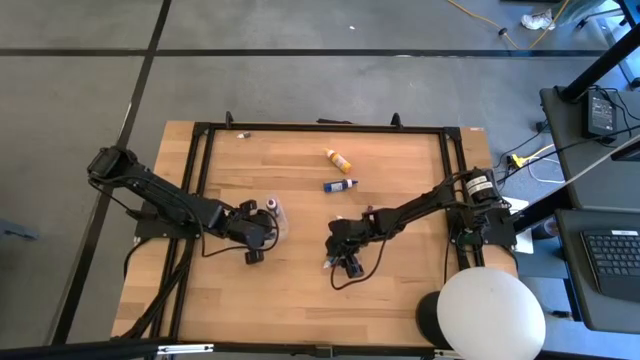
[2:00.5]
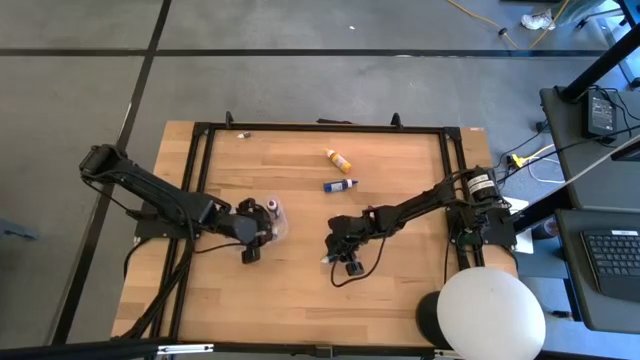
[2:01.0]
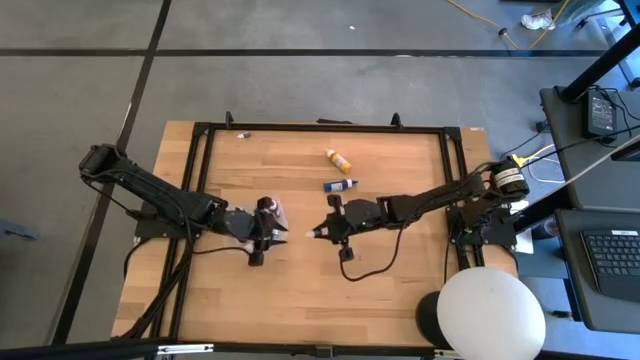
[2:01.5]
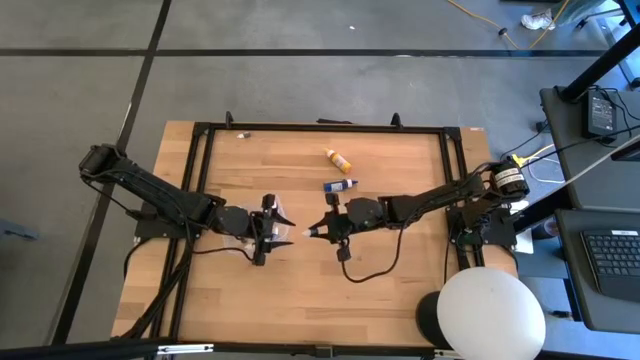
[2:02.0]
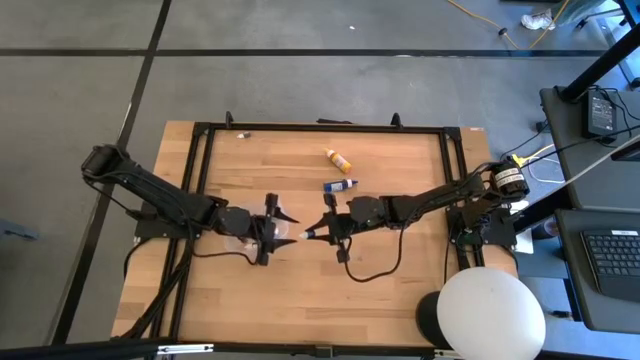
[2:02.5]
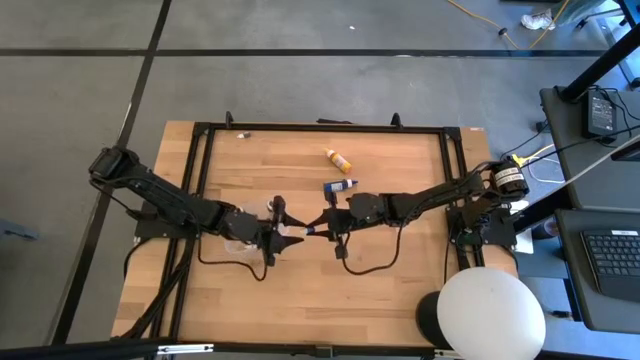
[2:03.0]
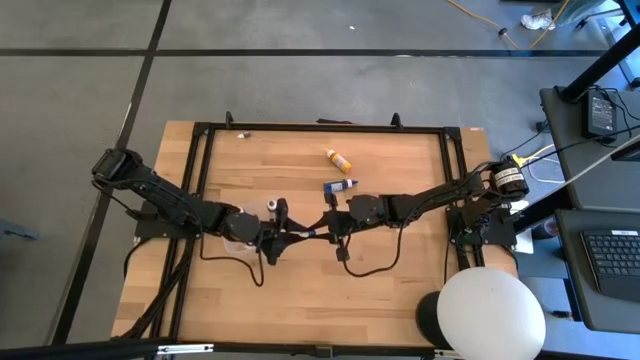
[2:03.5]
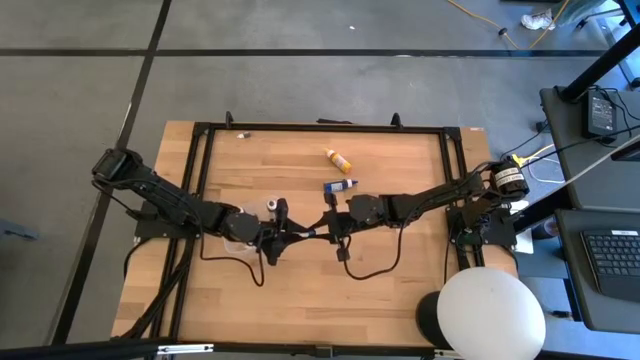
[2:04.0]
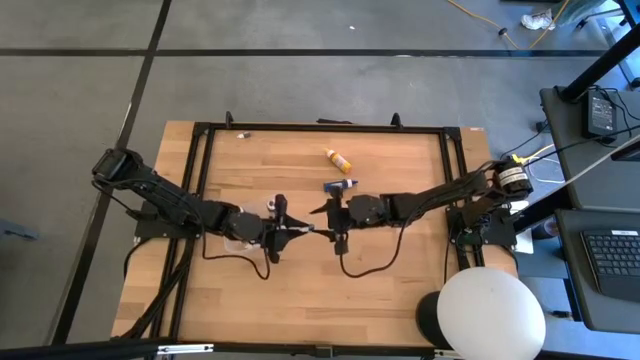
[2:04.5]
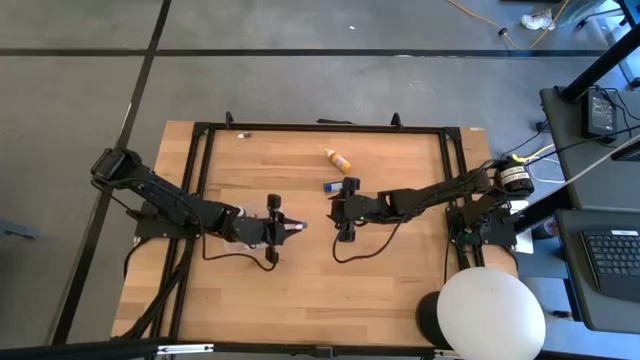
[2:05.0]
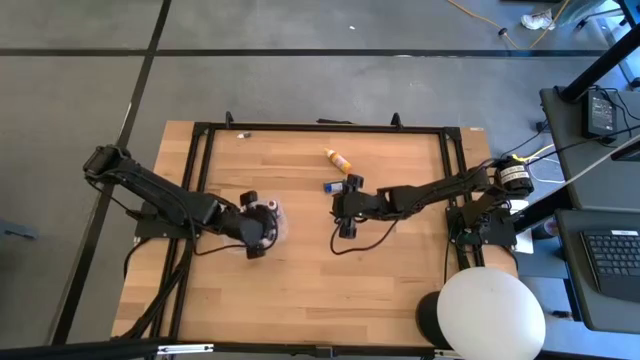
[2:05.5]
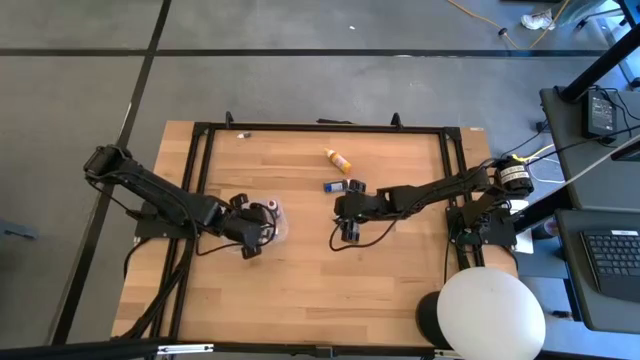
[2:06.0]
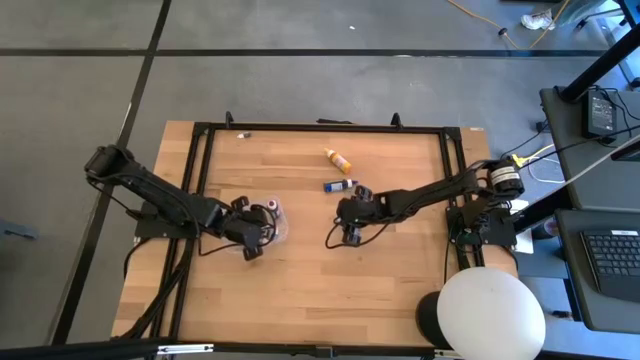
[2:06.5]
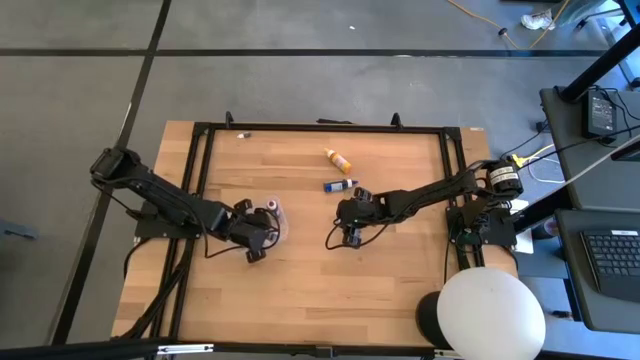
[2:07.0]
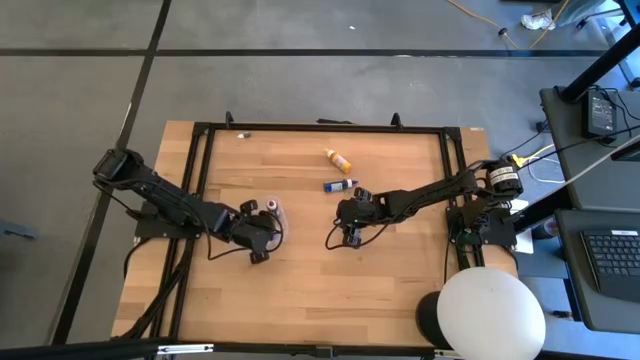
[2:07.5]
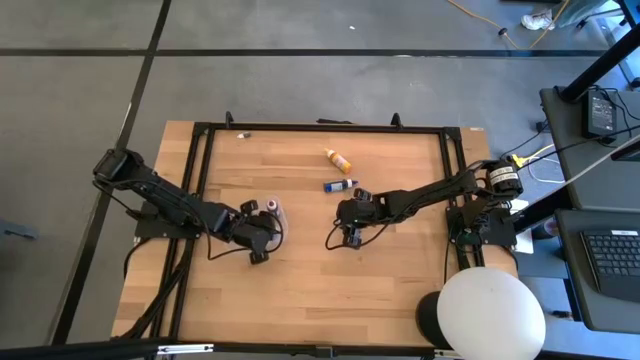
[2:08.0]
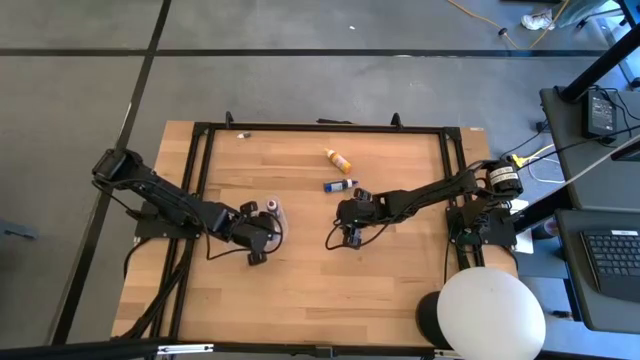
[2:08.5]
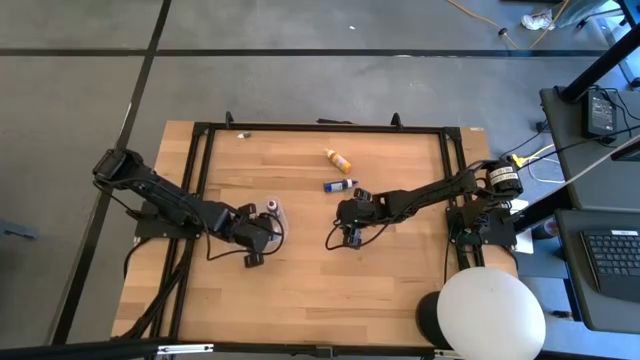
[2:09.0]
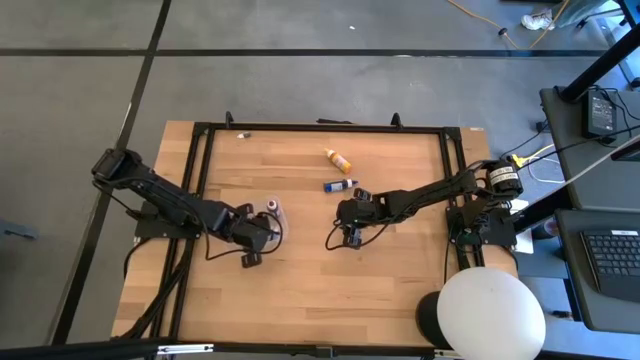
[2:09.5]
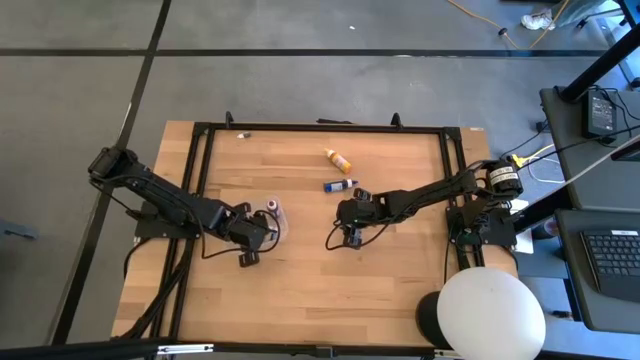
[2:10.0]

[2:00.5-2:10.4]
Task: Pick & Place food coloring
Put the small blue food coloring bottle into the transparent bin

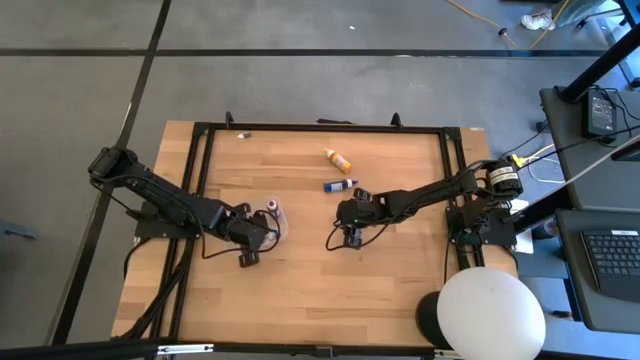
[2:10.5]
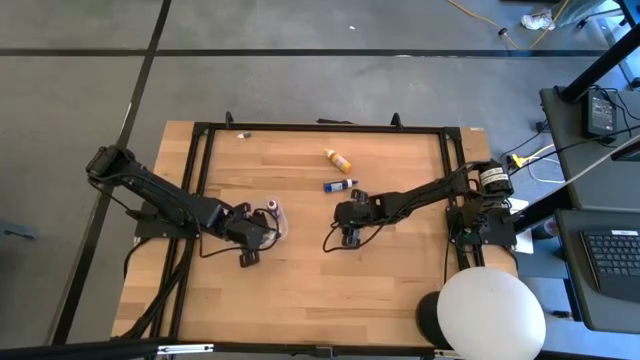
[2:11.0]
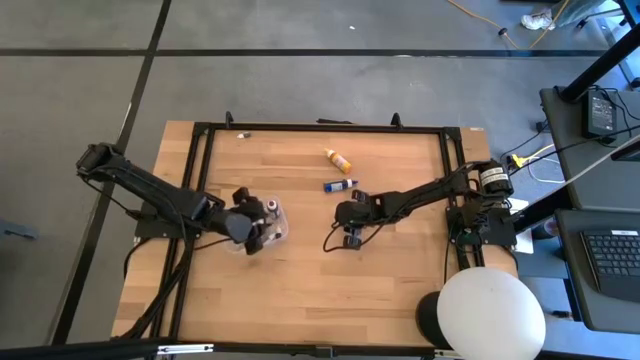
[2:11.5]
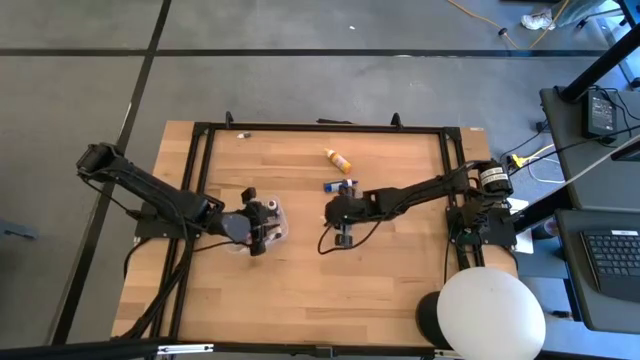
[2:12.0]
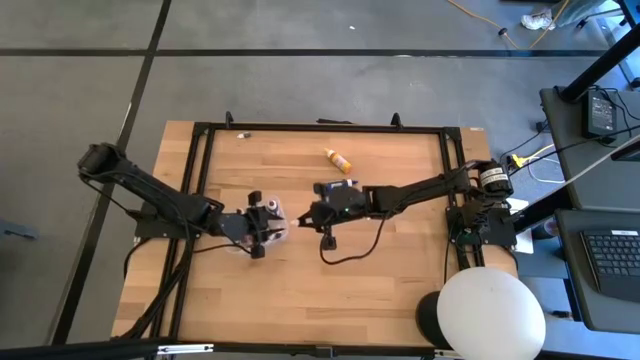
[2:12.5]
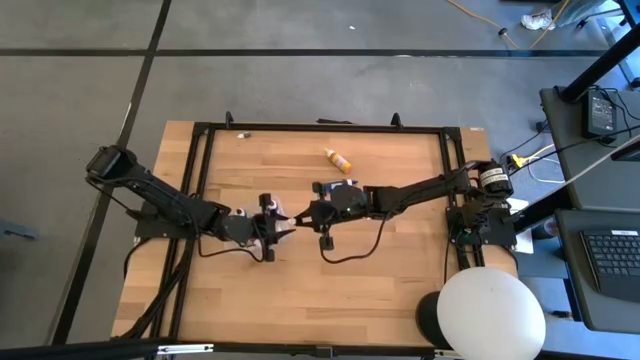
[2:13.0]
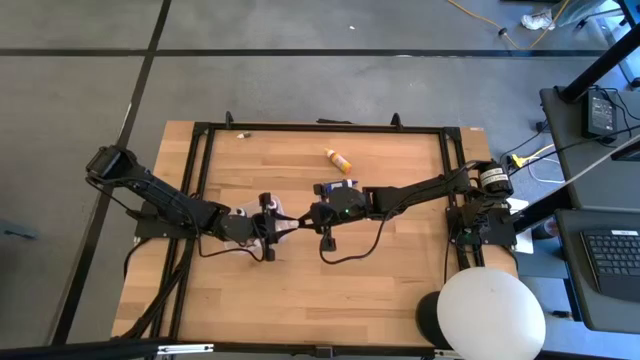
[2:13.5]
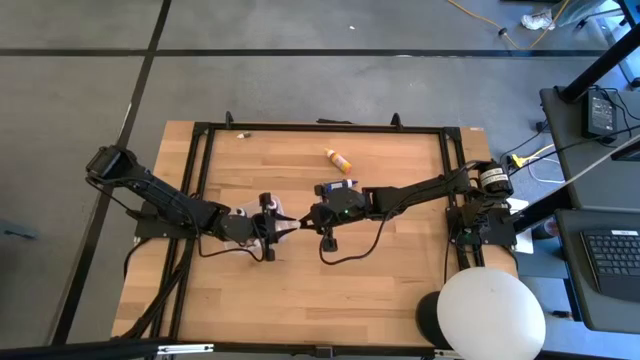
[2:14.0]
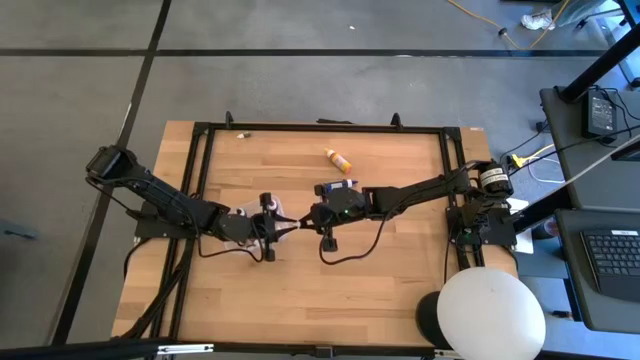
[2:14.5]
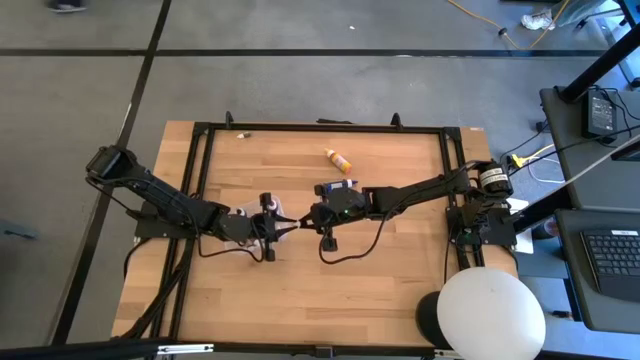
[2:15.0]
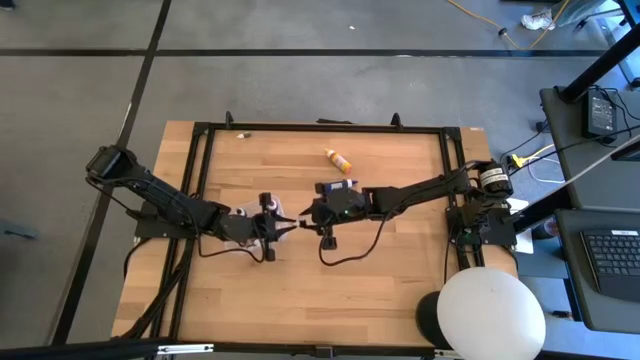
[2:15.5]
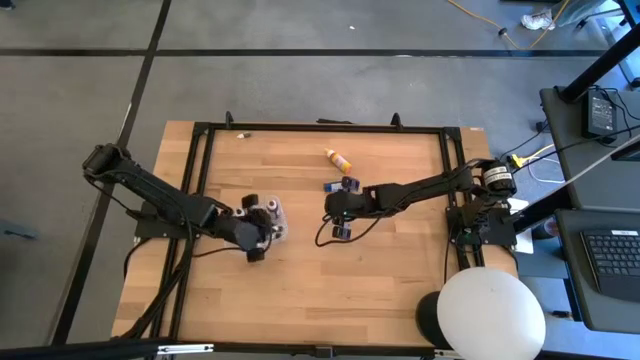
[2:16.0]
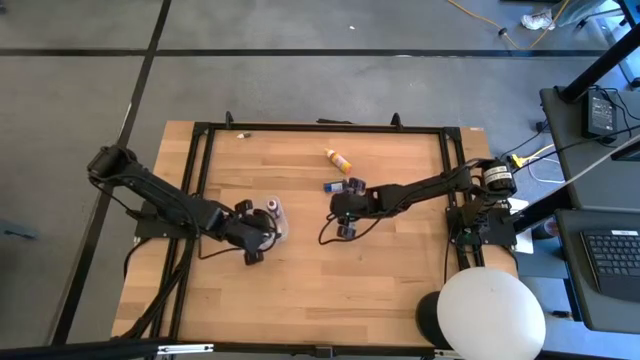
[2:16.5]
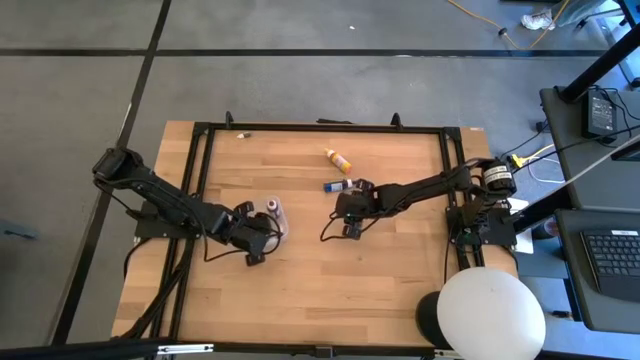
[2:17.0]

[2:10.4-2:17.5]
Put the small green food coloring bottle into the transparent bin

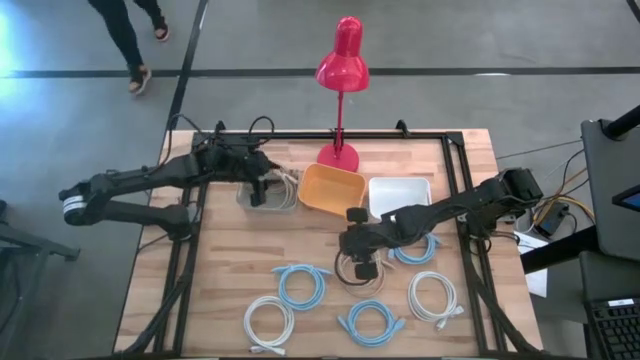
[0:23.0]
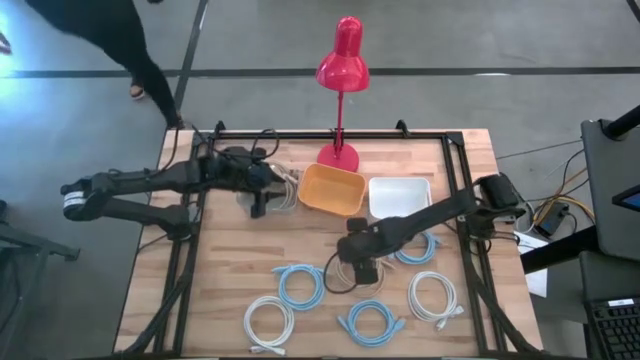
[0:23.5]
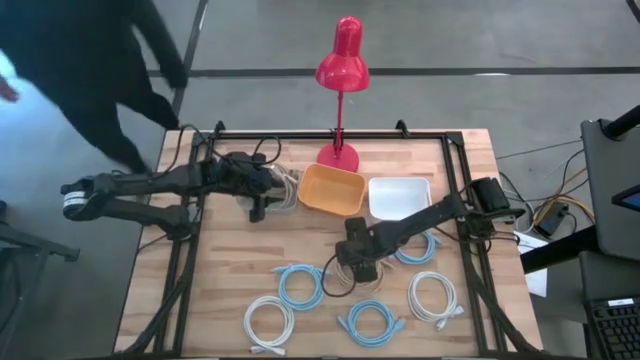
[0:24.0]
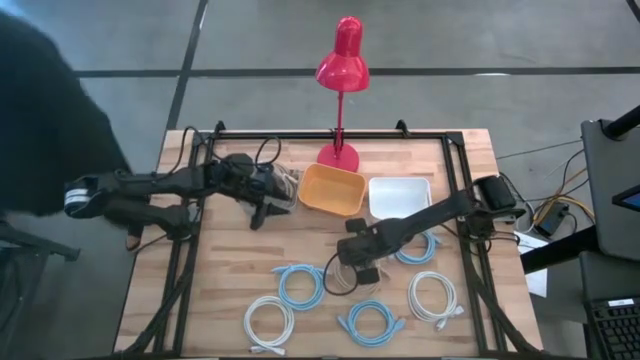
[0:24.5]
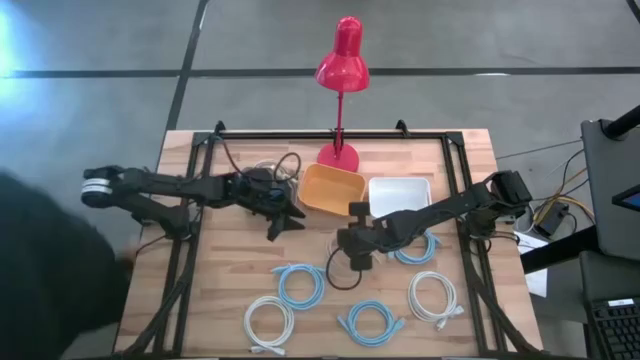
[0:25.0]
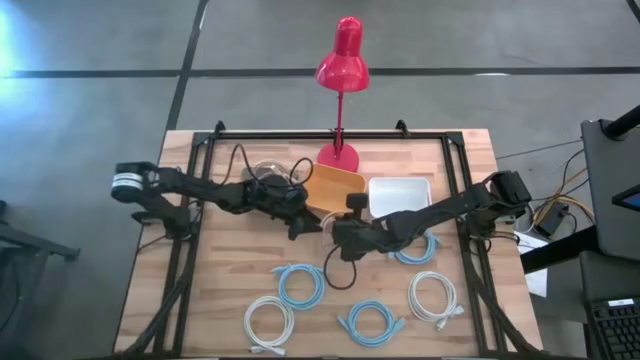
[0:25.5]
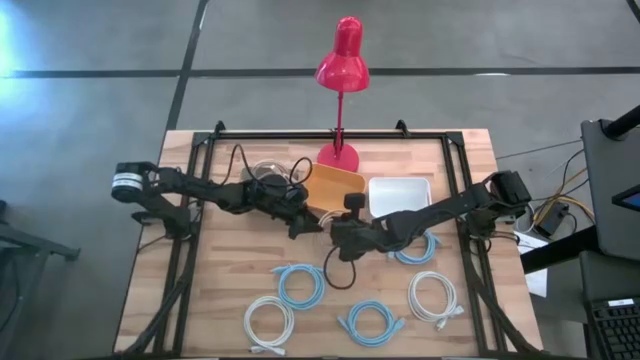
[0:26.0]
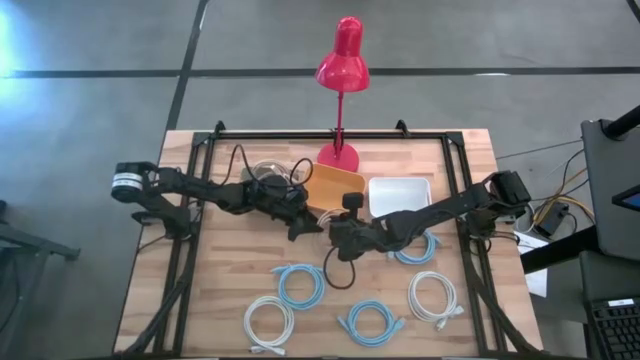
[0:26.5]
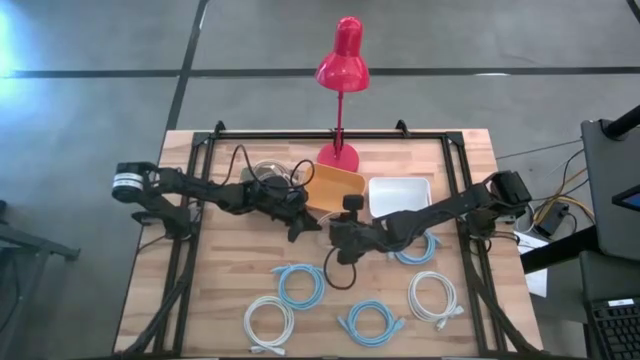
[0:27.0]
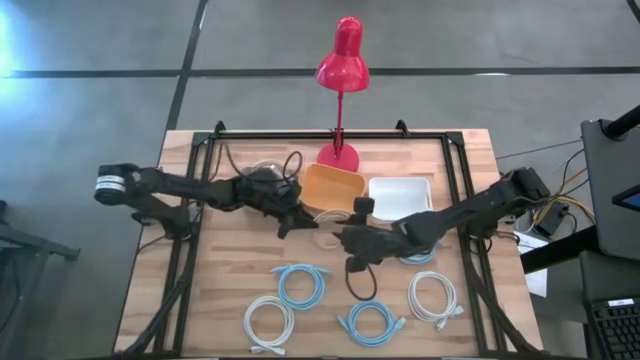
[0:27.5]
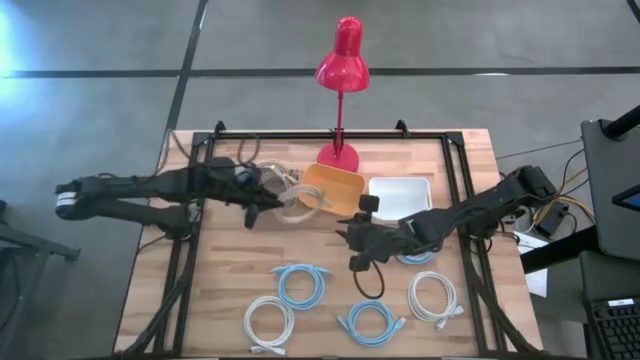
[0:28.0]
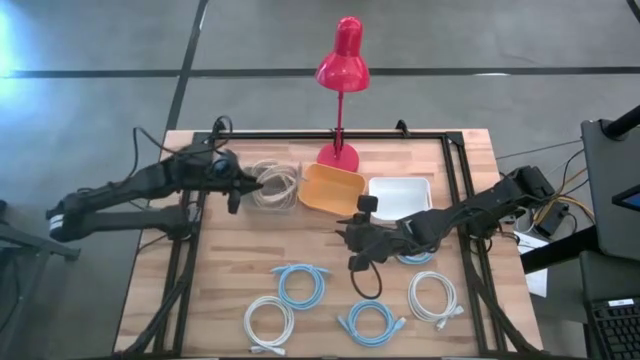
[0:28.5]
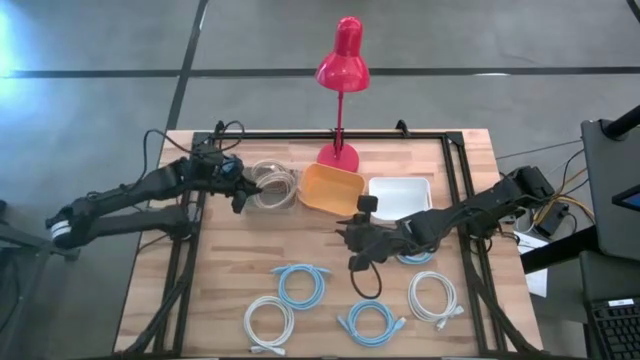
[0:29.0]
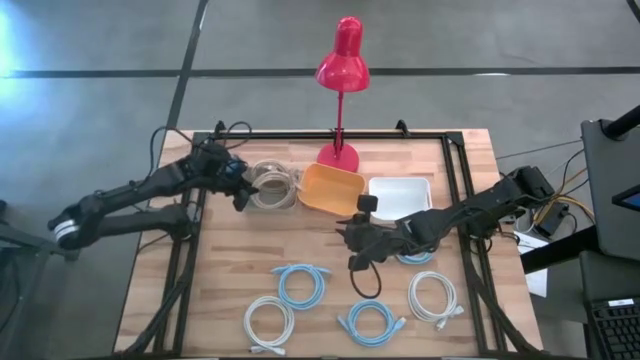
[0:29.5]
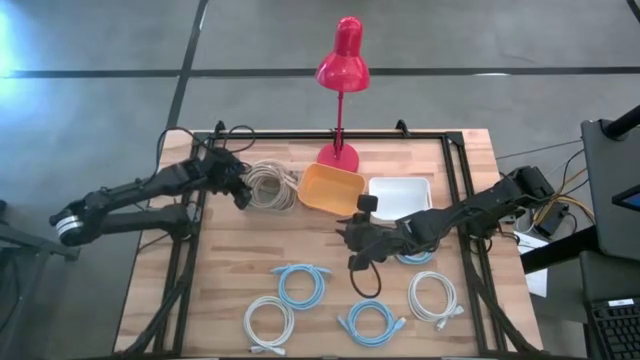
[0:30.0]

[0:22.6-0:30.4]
Task: Sort HDMI cables
Put the brown hdmi cable into the gray bin
